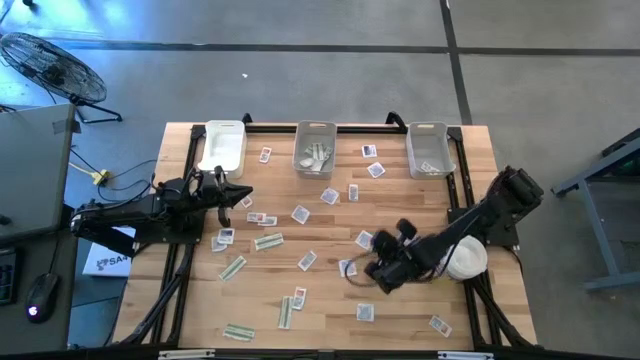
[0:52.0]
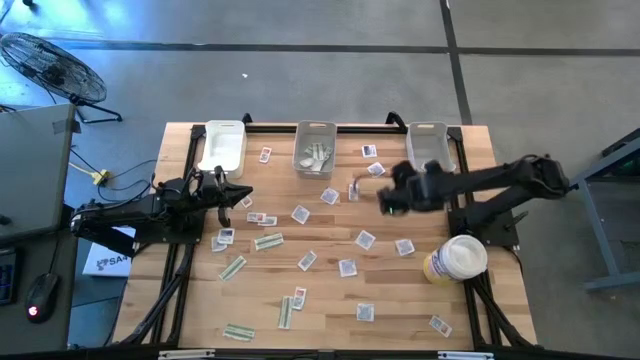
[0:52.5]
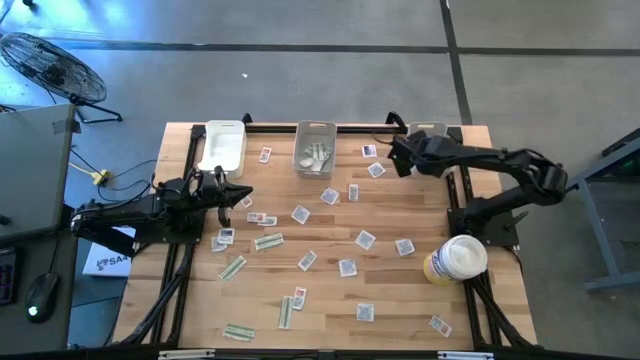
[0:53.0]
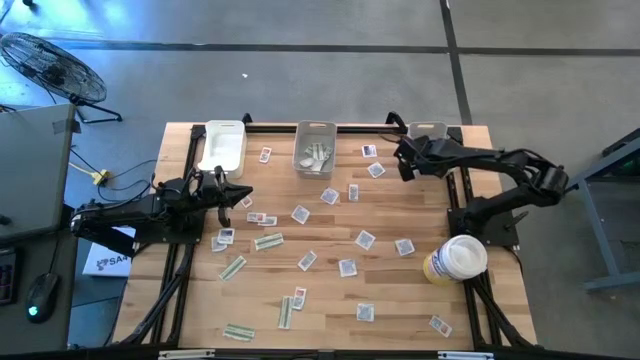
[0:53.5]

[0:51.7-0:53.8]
Task: Pick & Place First Aid Supplies
Put the orange pad into the right gray bin

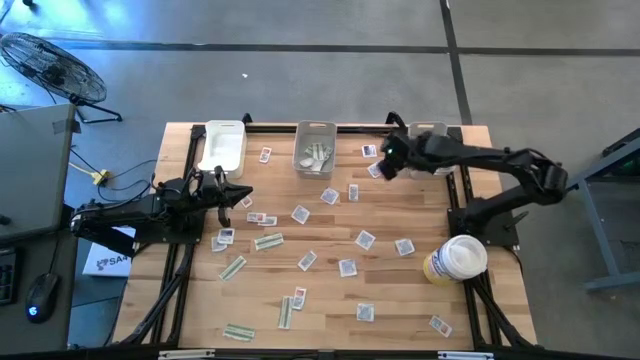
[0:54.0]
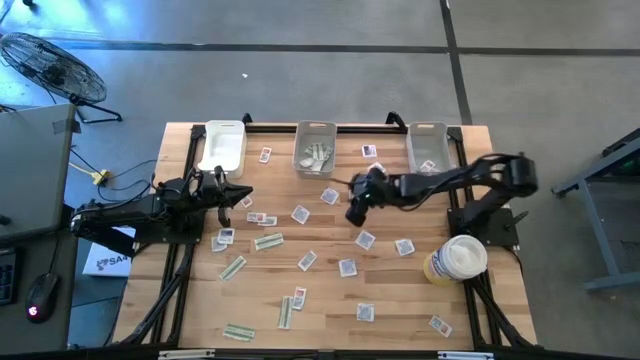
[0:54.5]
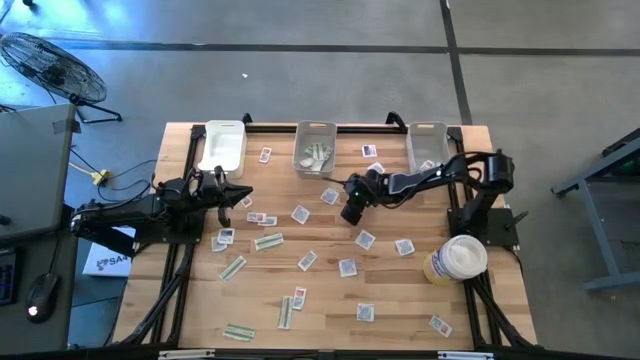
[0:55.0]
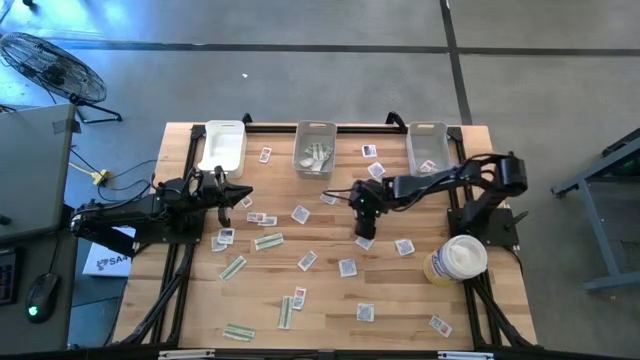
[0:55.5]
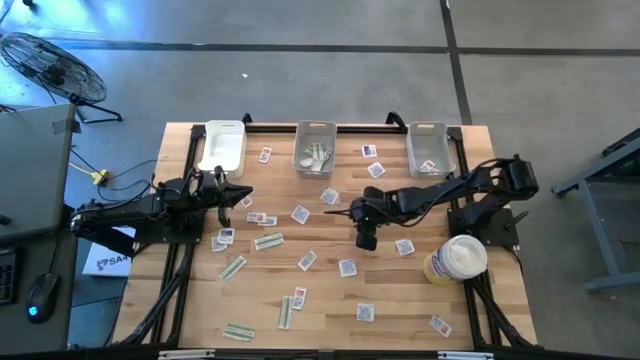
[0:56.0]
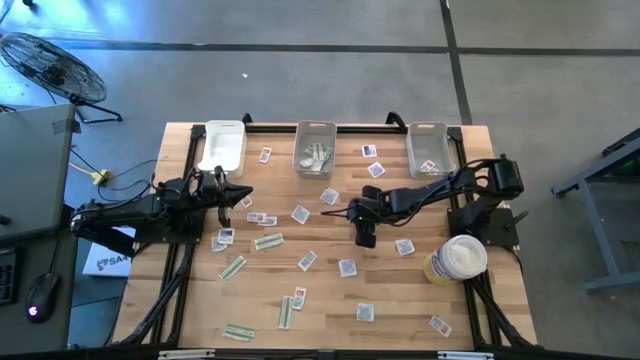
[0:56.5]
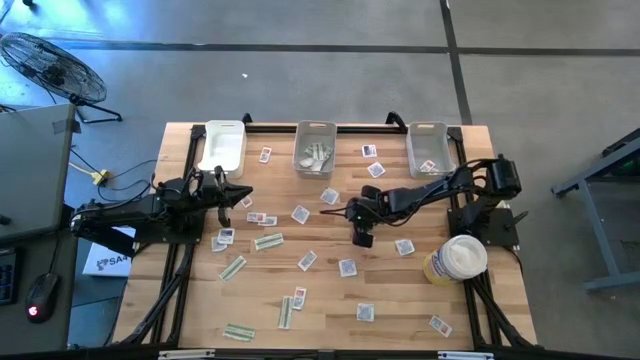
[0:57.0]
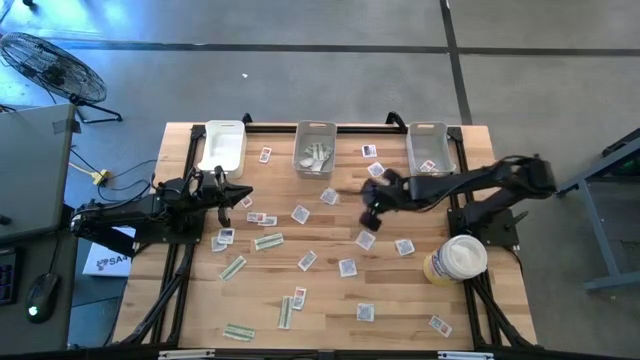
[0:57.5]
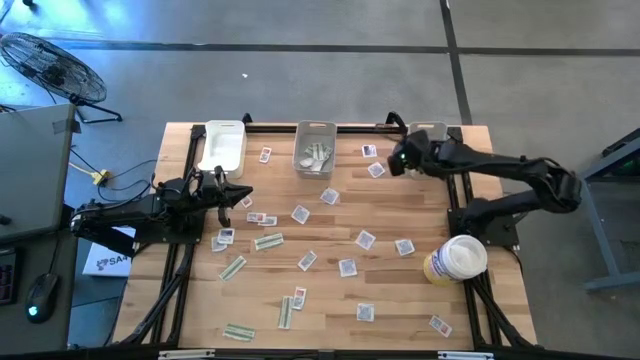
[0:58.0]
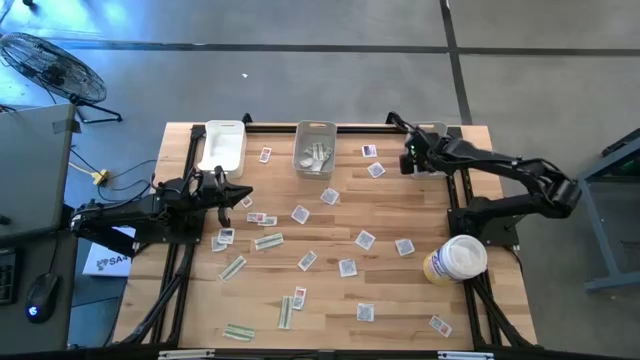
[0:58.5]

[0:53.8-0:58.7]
Put the orange pad into the right gray bin

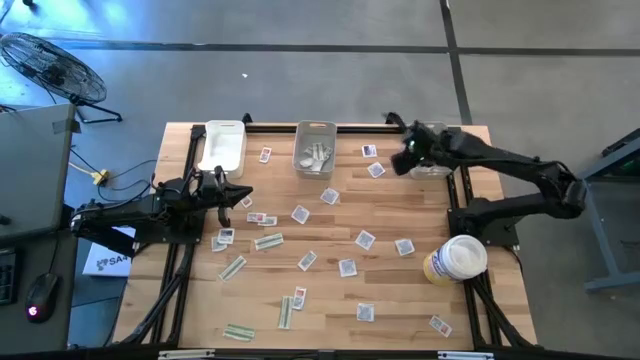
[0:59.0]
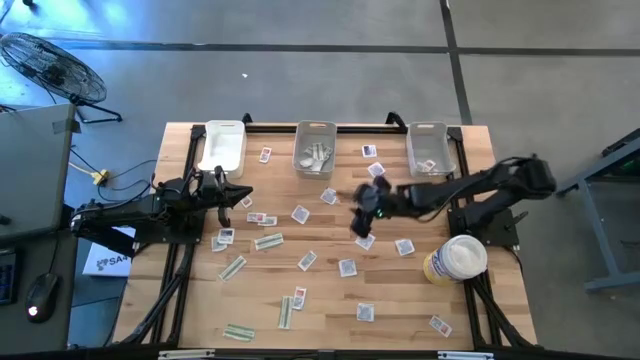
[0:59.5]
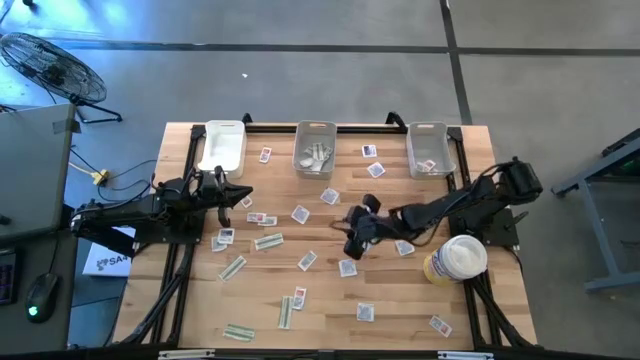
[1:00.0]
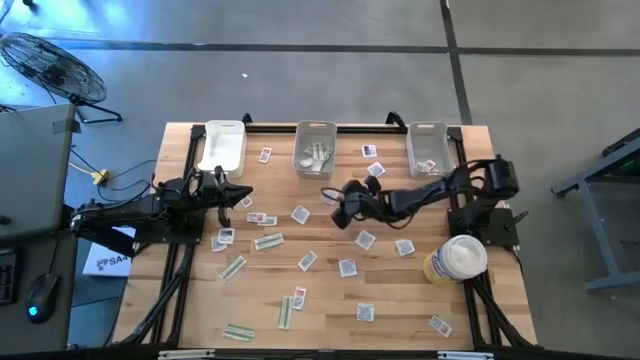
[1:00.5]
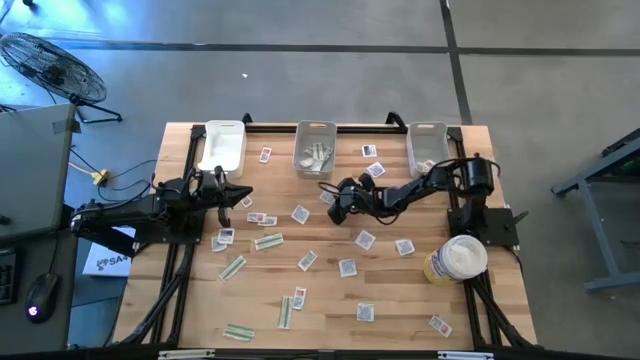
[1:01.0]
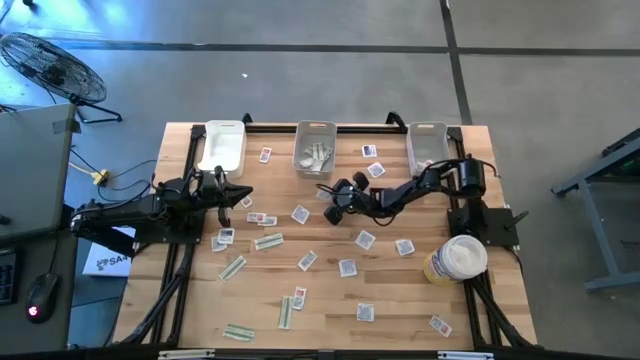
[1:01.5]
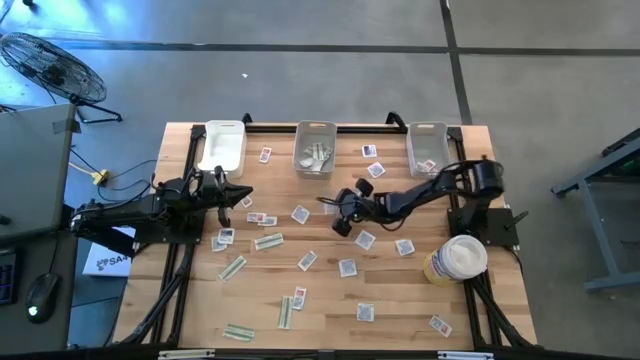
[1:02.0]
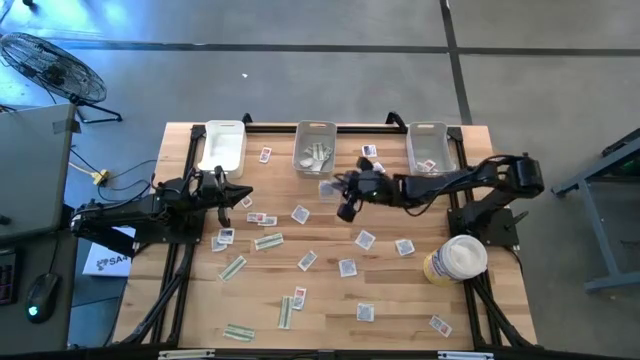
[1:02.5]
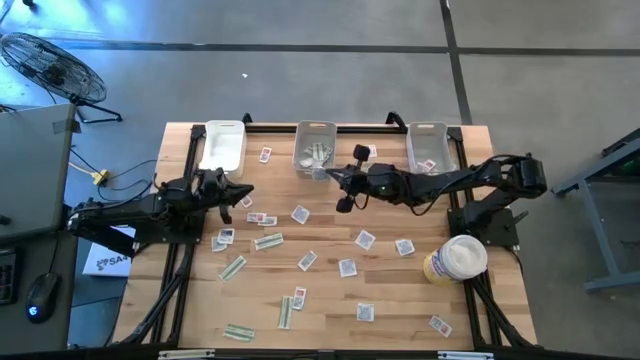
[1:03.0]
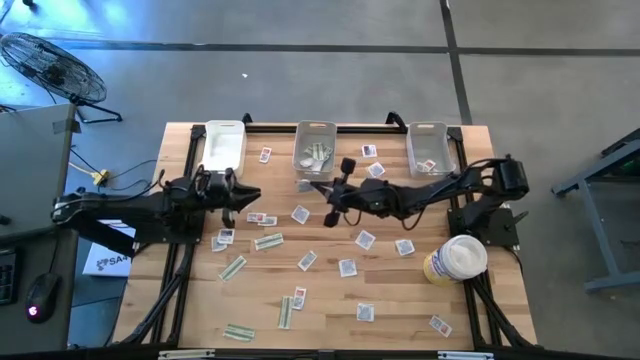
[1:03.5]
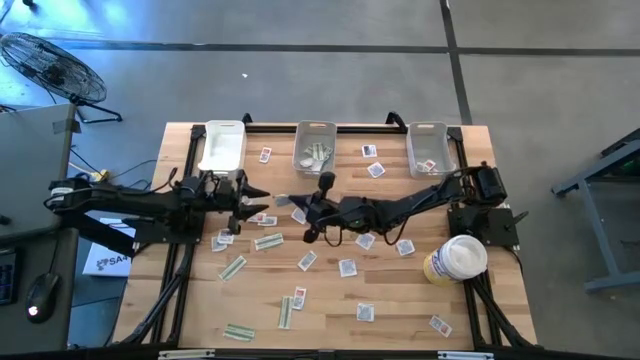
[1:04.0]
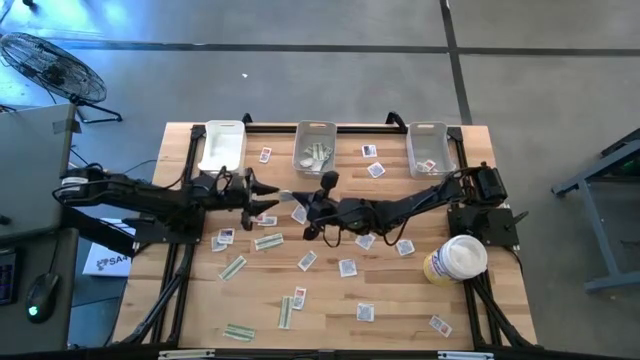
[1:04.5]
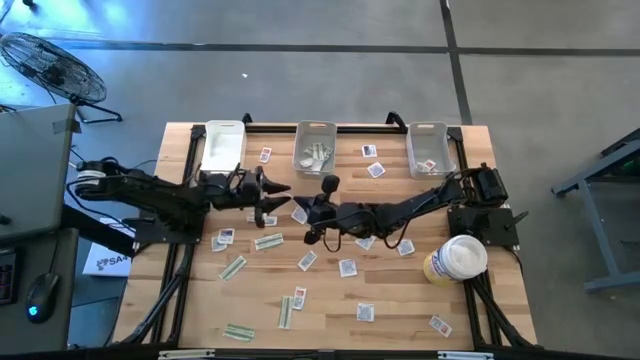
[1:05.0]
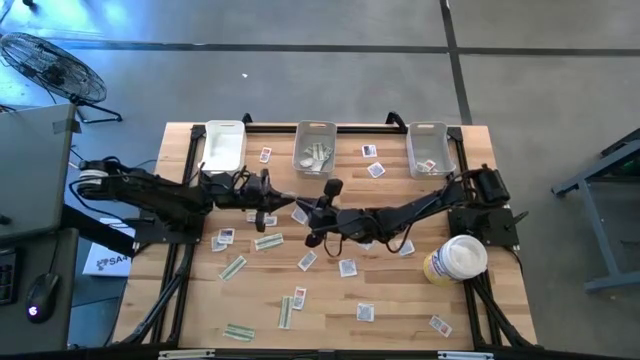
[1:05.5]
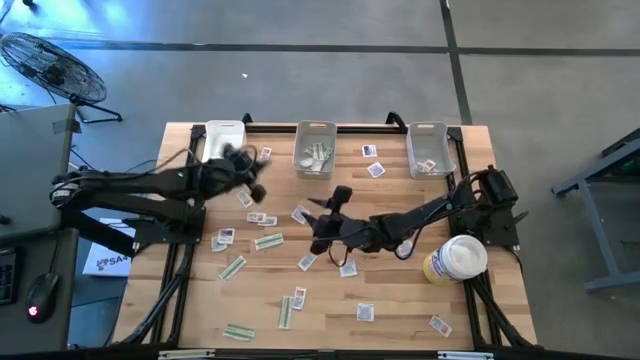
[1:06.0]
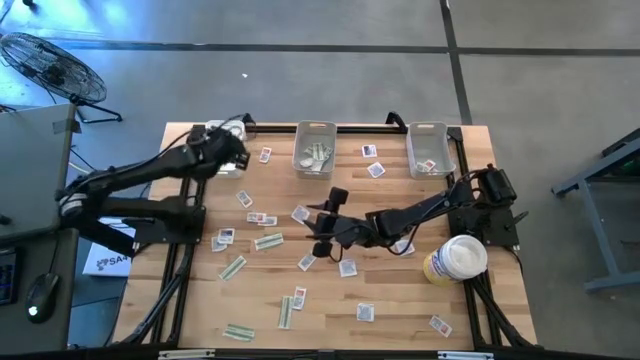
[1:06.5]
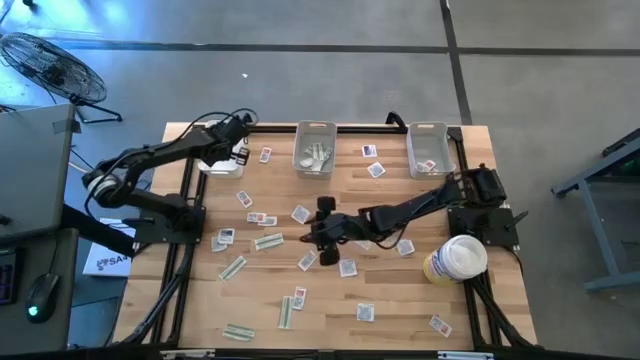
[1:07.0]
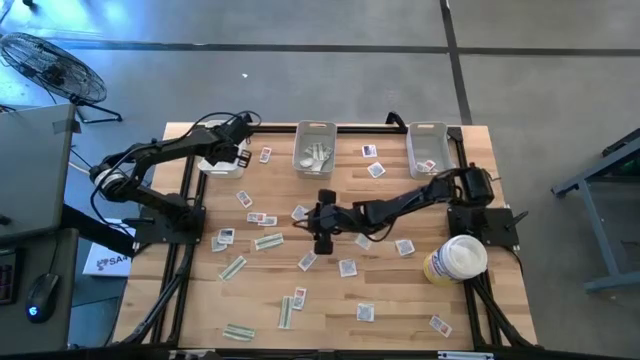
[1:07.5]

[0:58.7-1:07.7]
Put the blue pad into the white bin

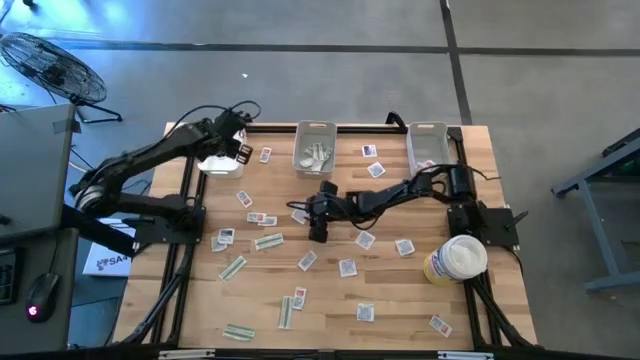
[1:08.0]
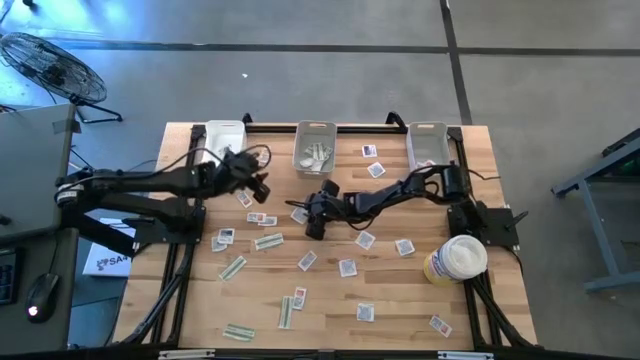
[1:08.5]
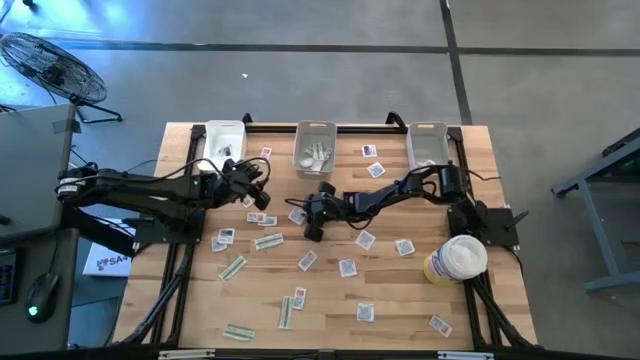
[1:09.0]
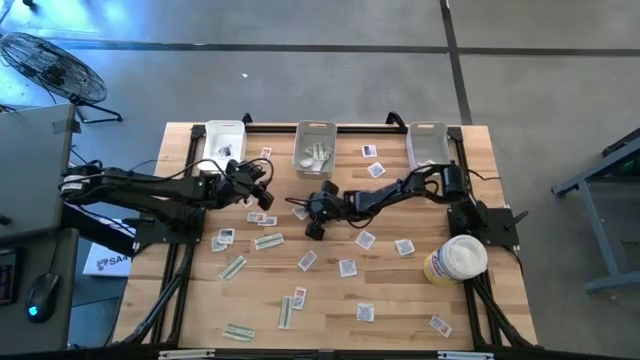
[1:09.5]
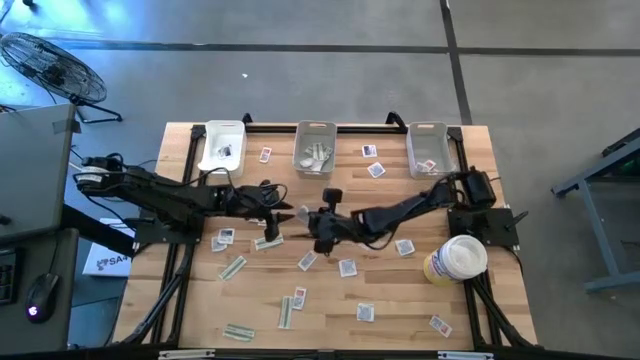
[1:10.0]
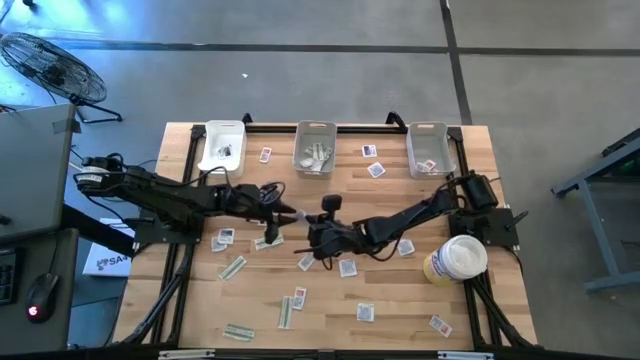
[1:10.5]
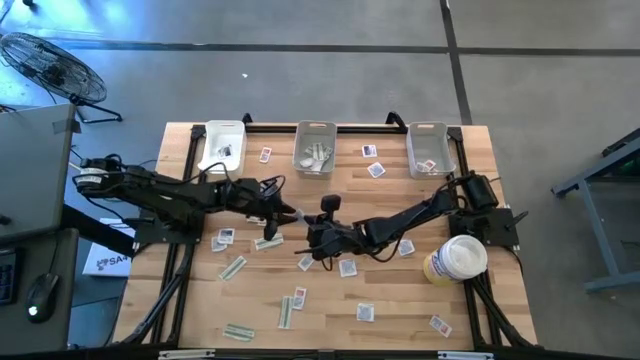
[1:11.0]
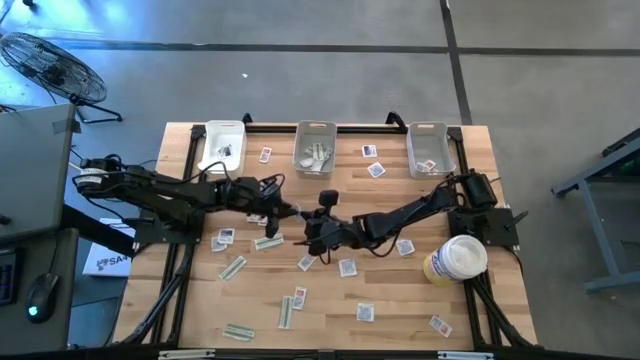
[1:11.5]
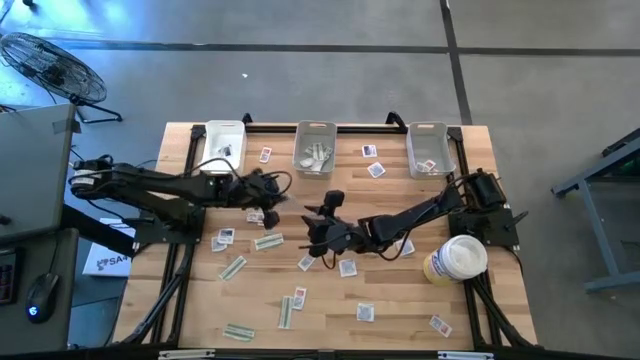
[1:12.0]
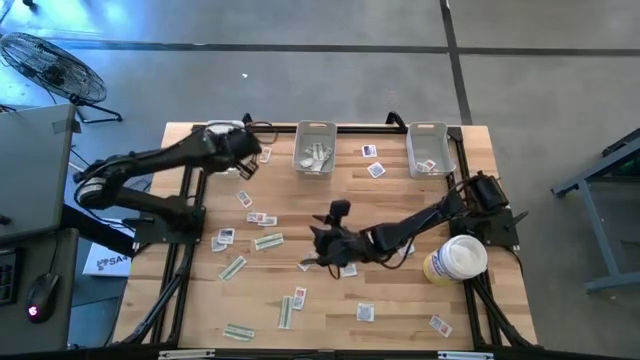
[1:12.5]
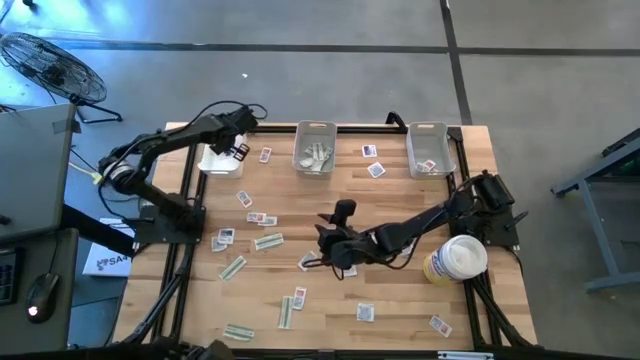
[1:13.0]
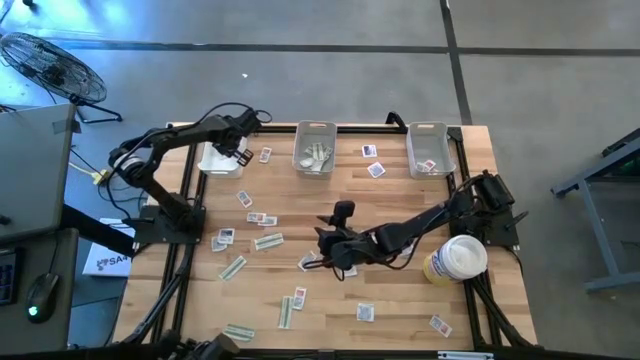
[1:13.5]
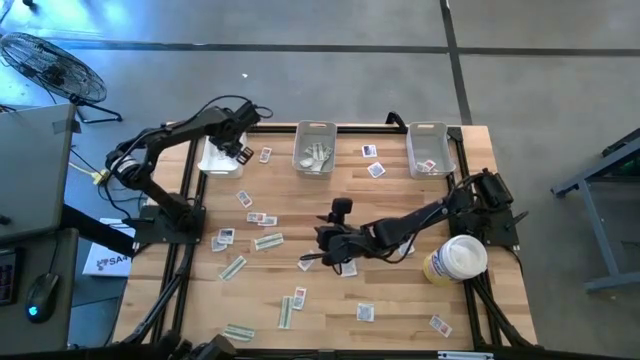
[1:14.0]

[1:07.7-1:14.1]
Put the blue pad into the white bin
